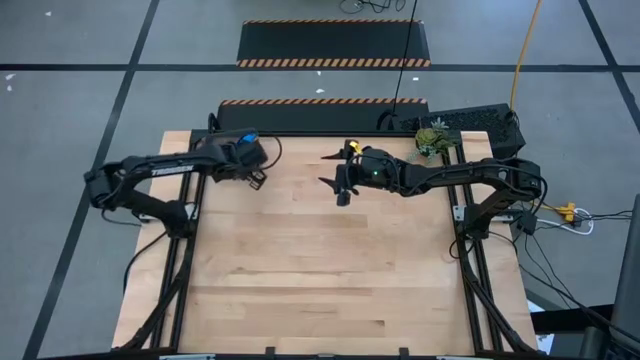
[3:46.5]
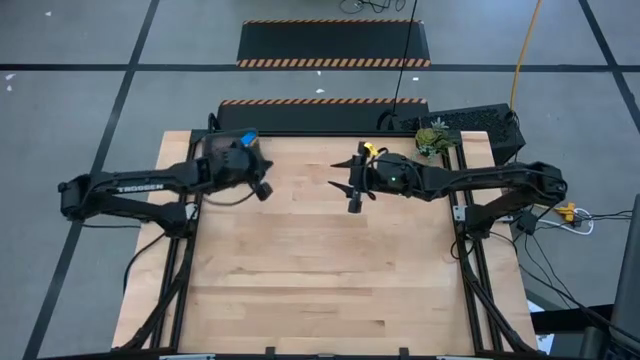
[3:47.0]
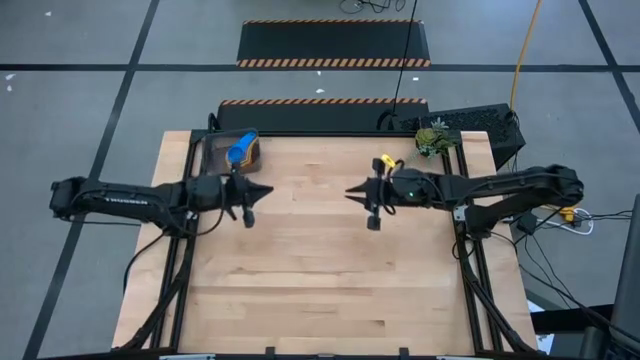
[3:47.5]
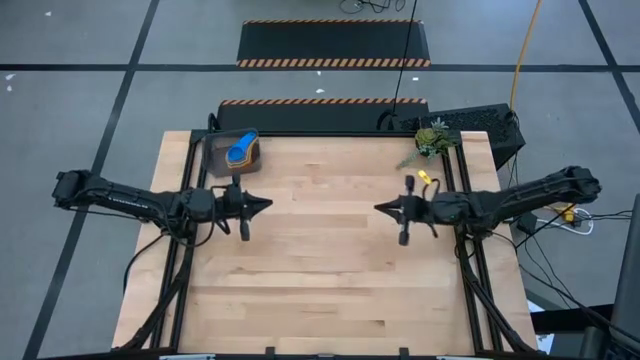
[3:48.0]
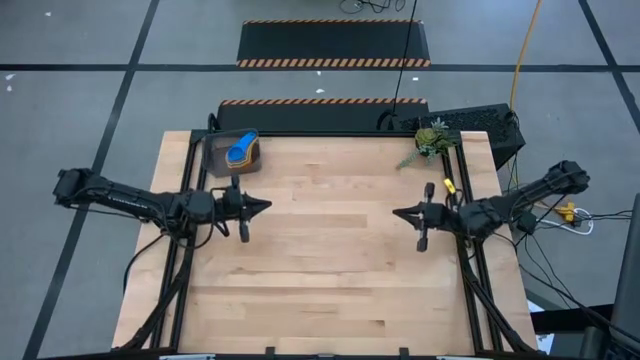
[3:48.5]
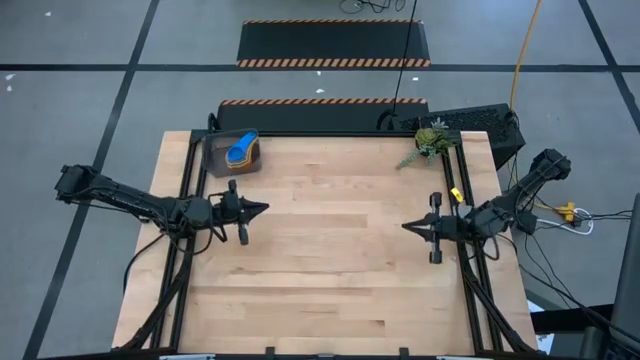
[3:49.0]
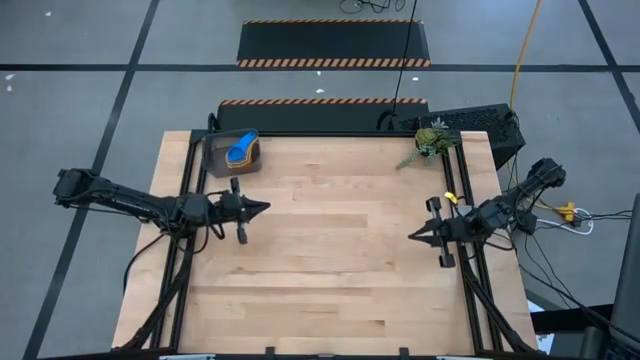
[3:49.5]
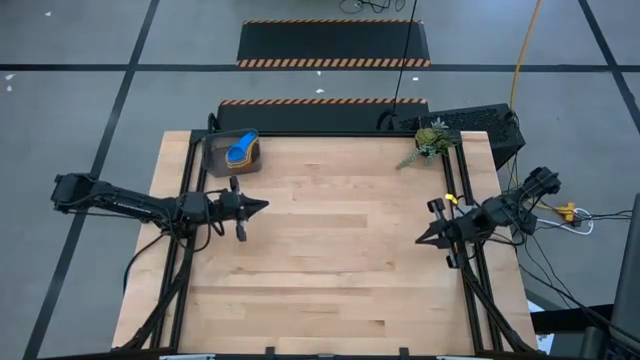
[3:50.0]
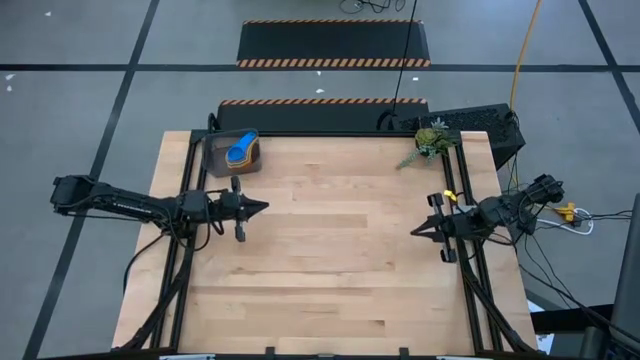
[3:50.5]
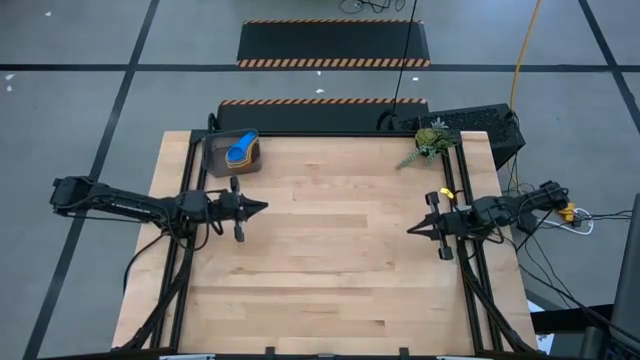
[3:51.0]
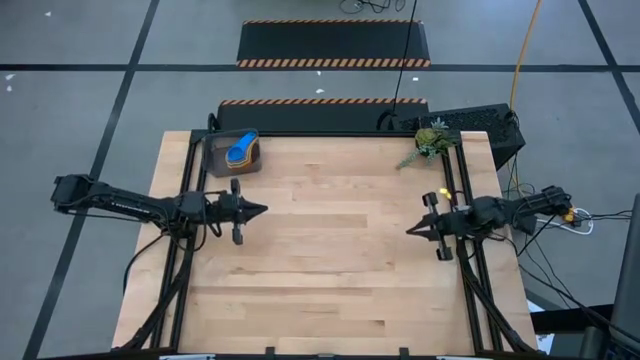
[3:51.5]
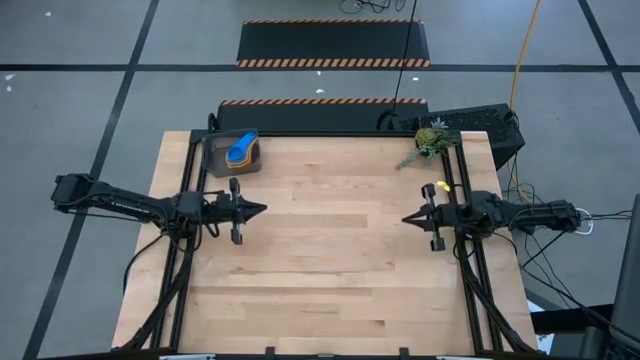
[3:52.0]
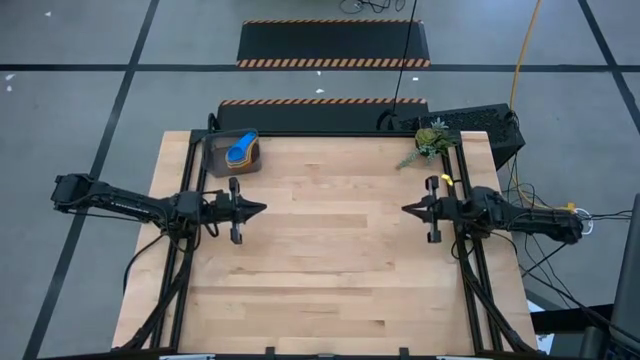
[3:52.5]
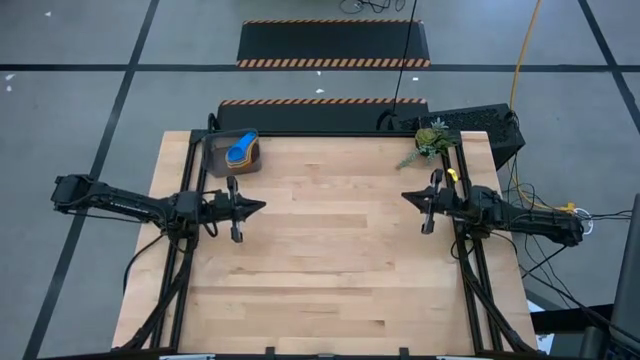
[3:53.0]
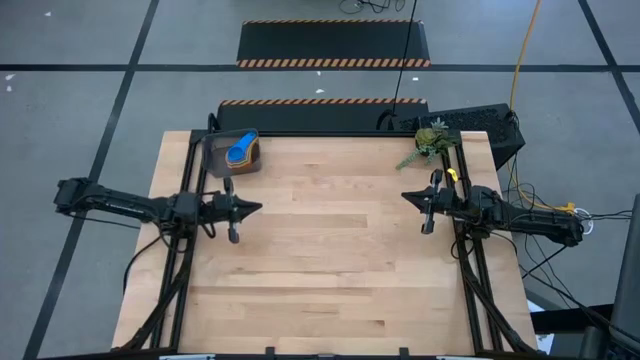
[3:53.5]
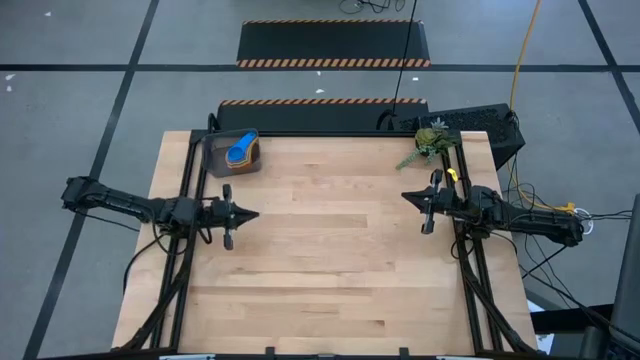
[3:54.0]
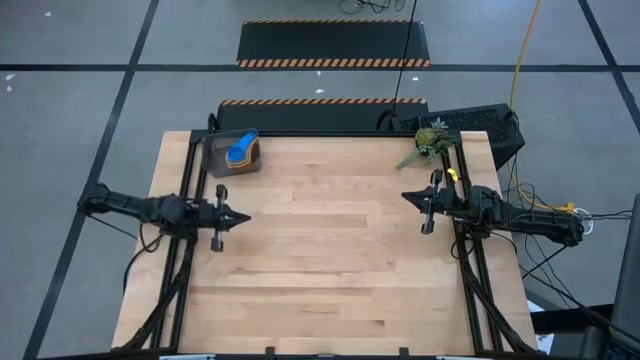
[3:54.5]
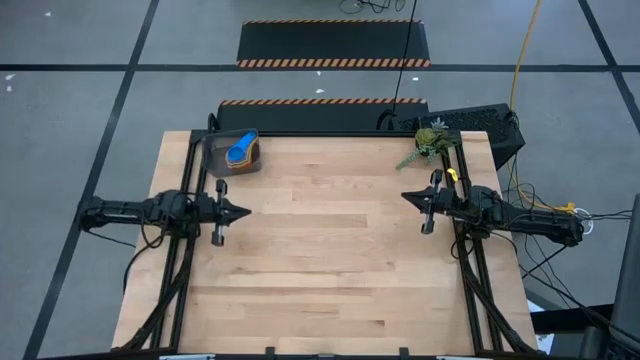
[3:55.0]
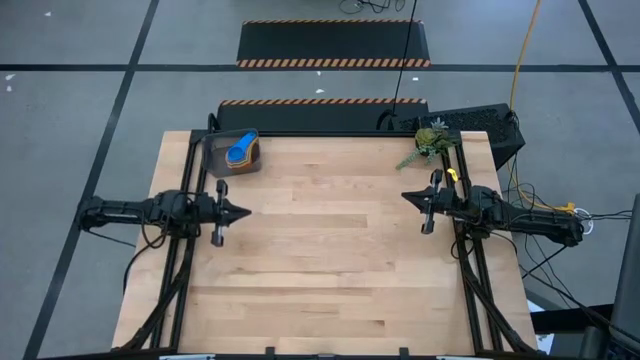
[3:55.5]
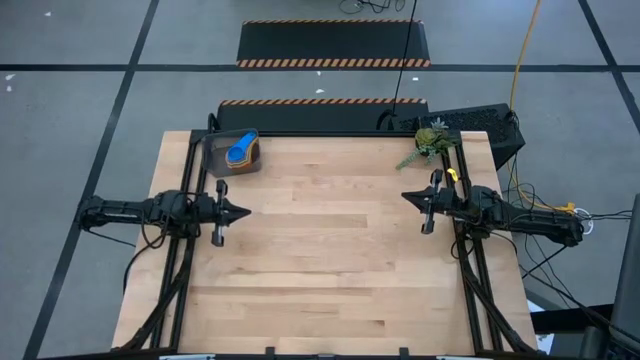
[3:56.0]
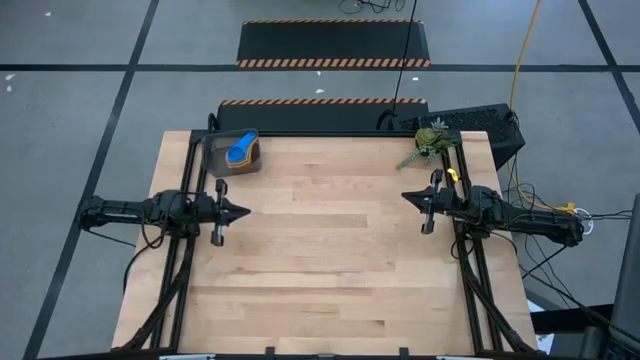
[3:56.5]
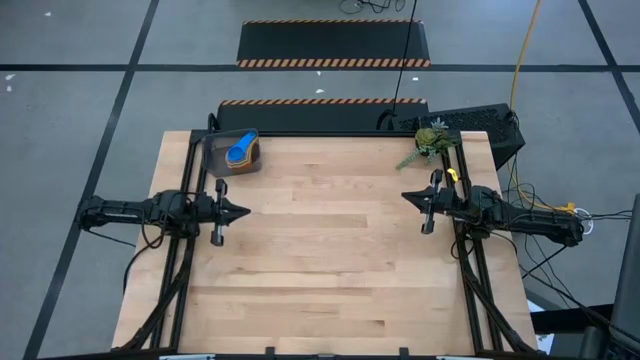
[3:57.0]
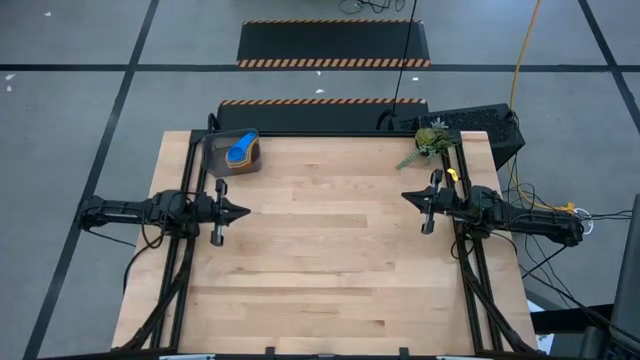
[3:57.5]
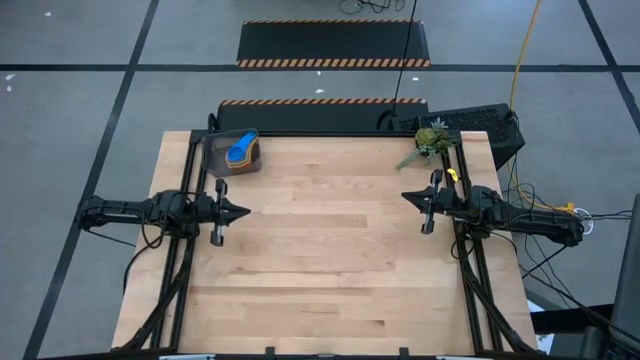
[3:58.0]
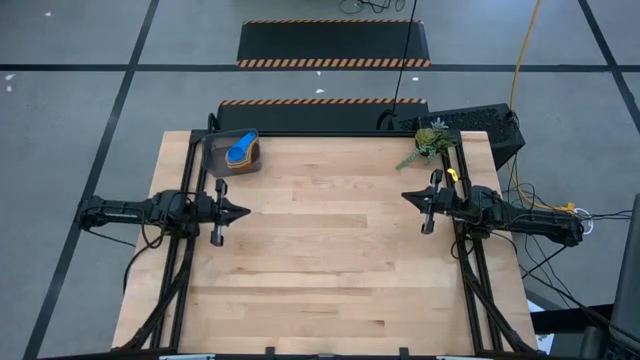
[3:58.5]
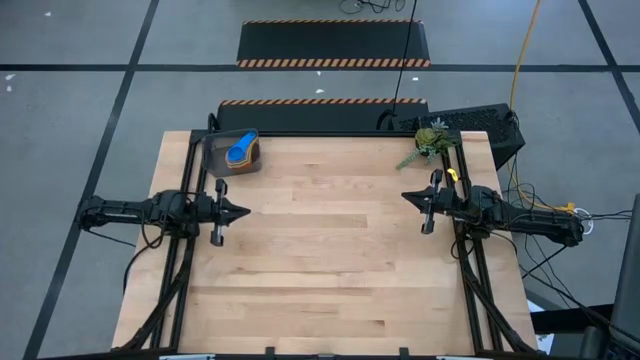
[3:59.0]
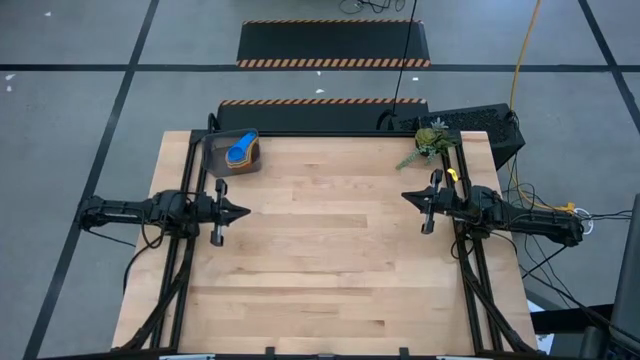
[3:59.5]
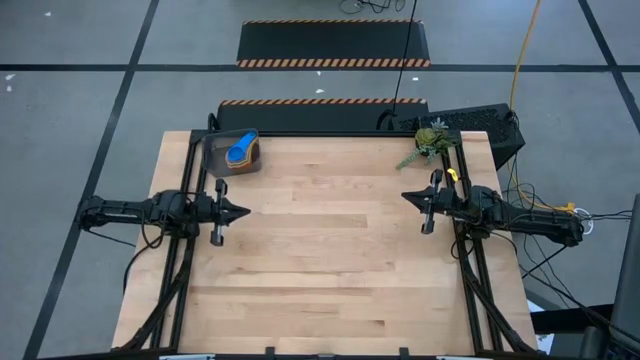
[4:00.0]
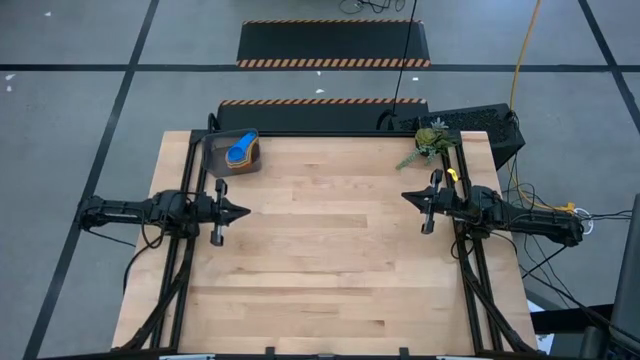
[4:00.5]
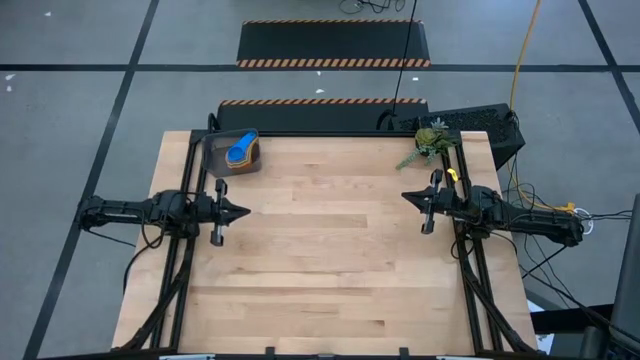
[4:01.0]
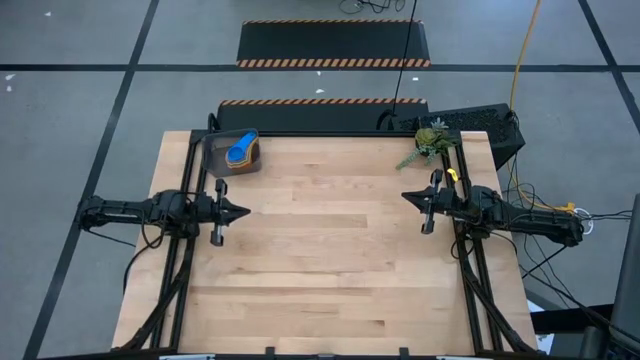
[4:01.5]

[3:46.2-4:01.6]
Task: Nest measuring cups in basket
Return to Home Position

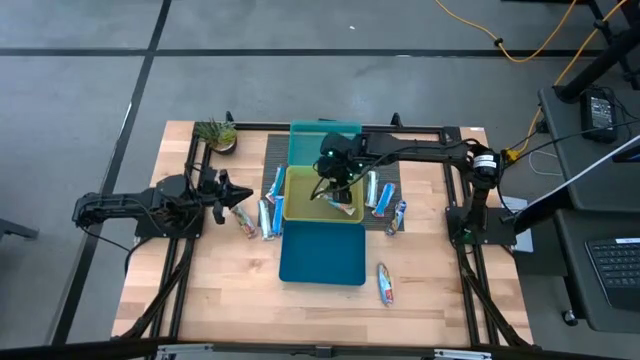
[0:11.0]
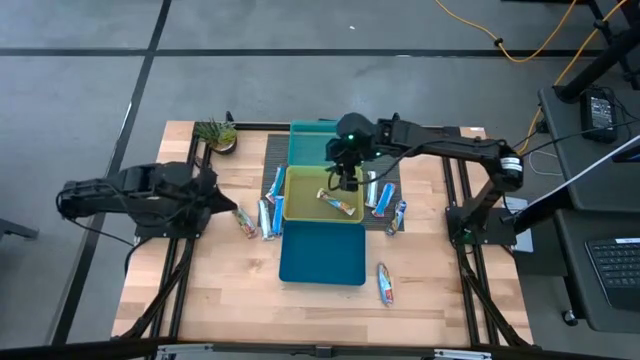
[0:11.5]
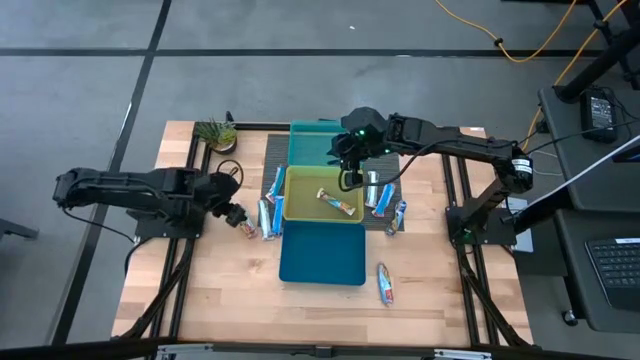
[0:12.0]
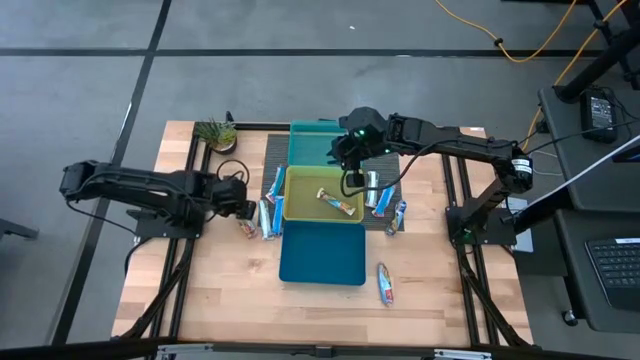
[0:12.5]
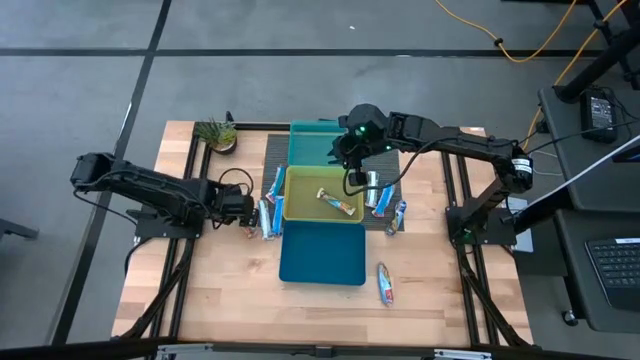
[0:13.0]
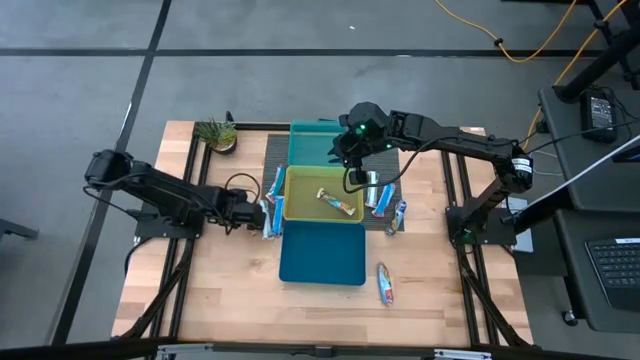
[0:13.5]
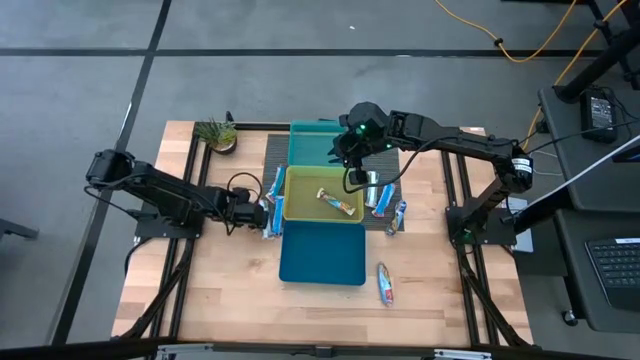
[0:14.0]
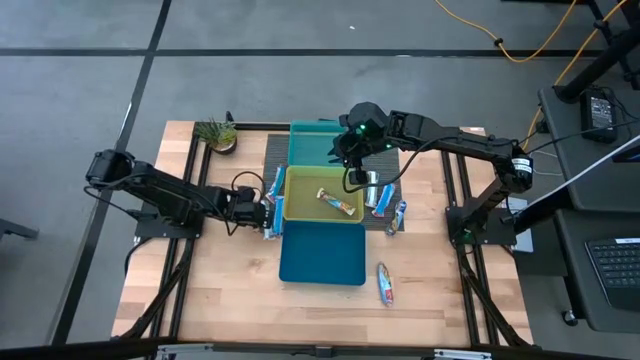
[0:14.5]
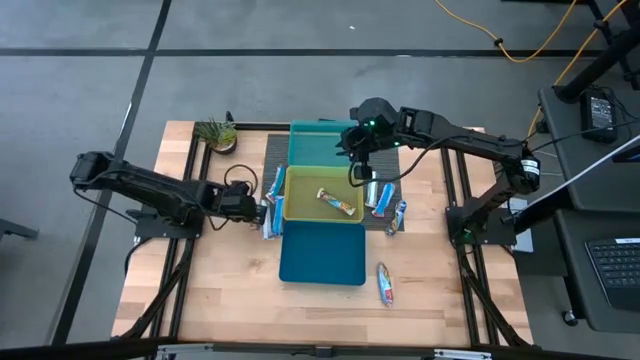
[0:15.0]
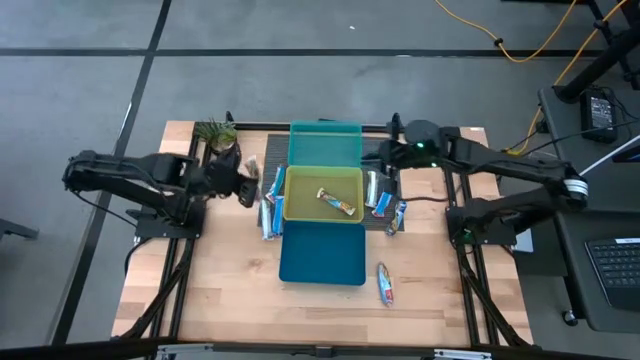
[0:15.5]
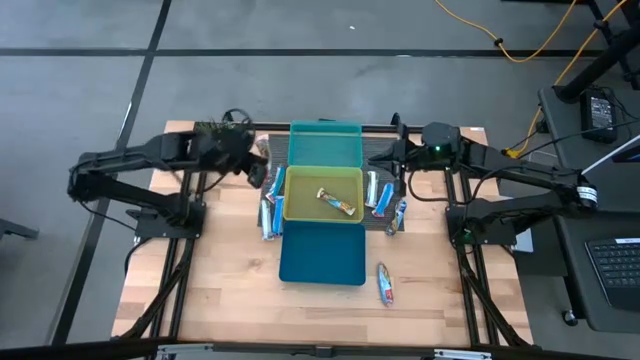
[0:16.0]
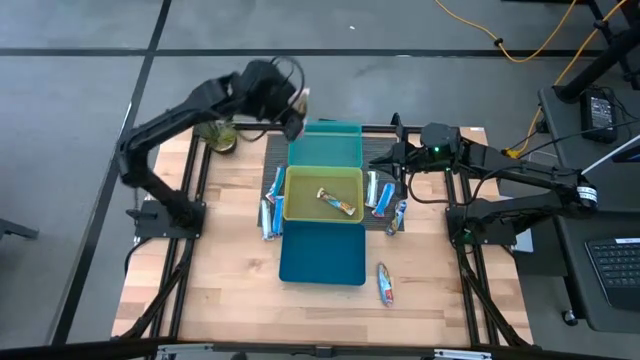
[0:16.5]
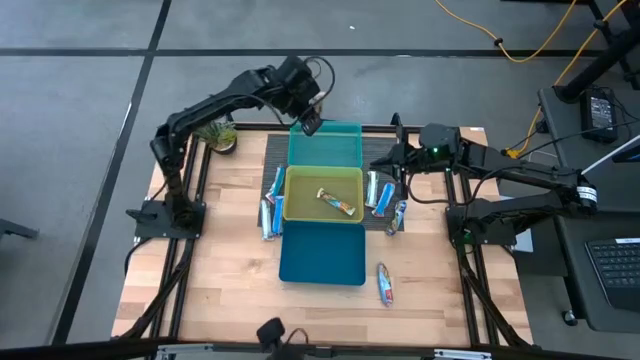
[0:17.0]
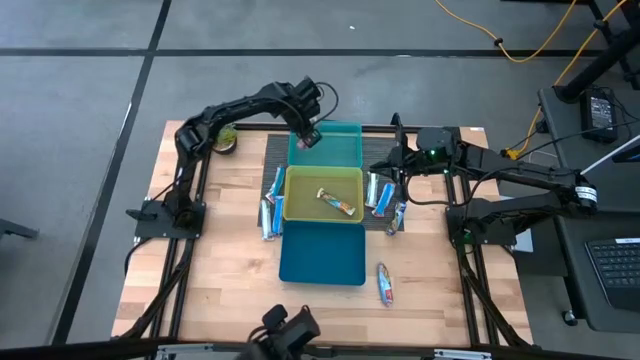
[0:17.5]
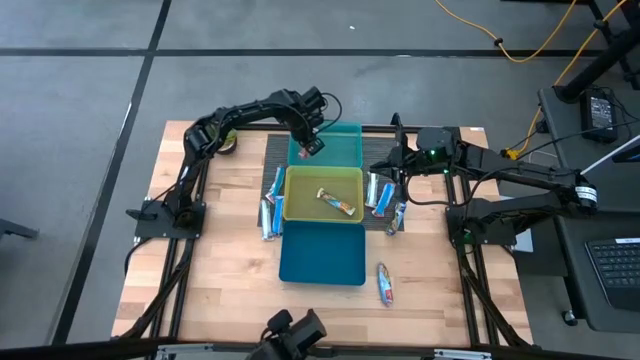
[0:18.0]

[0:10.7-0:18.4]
Task: Pick and place Granola Bars by type
Put the red granola bar into the green bin
